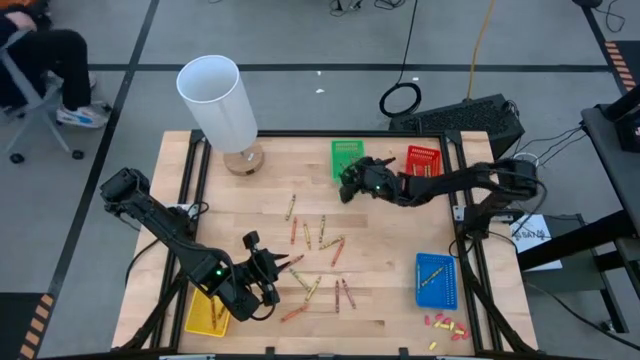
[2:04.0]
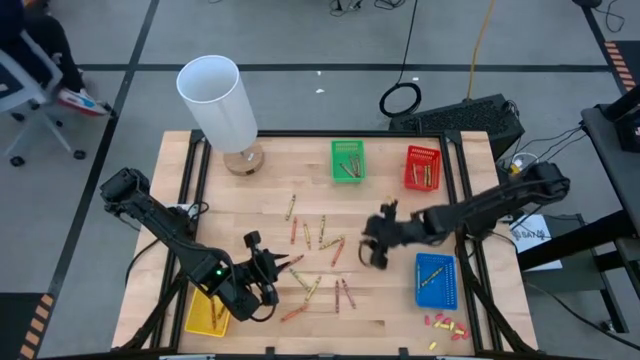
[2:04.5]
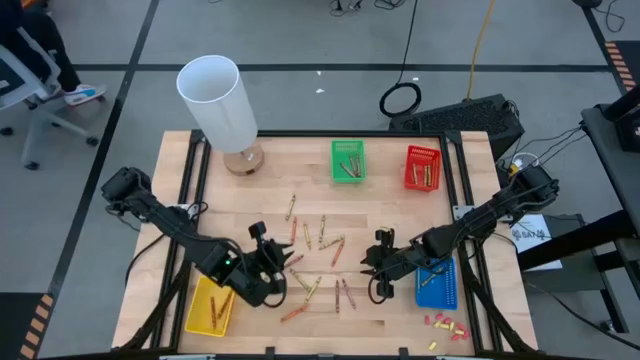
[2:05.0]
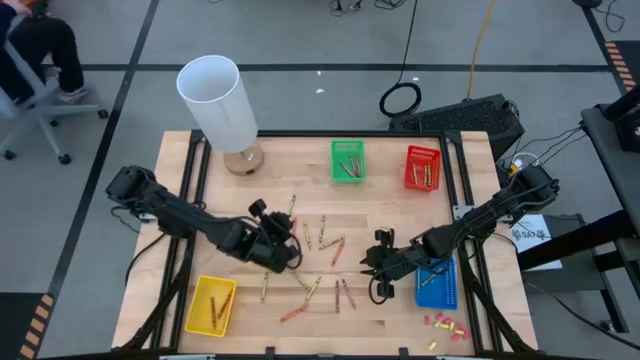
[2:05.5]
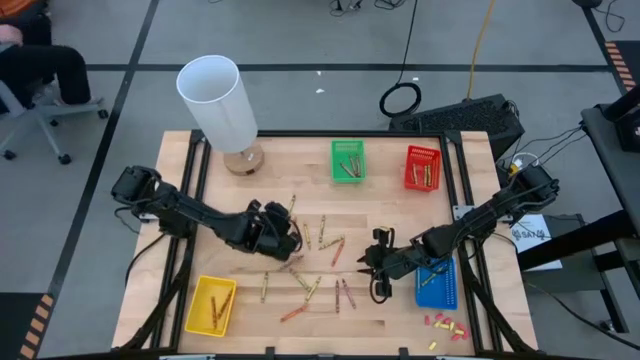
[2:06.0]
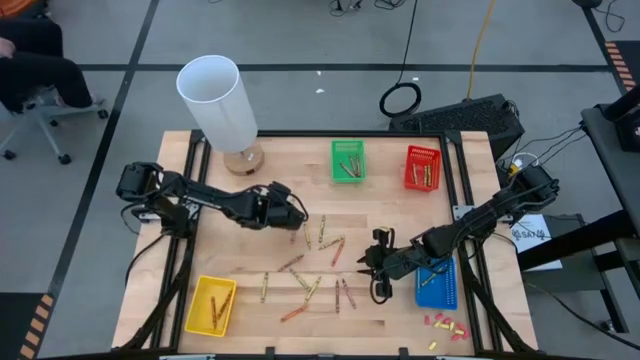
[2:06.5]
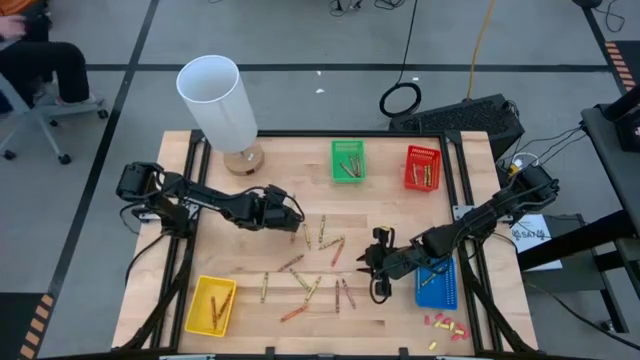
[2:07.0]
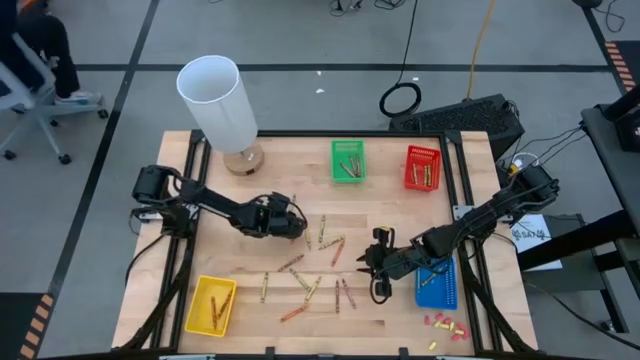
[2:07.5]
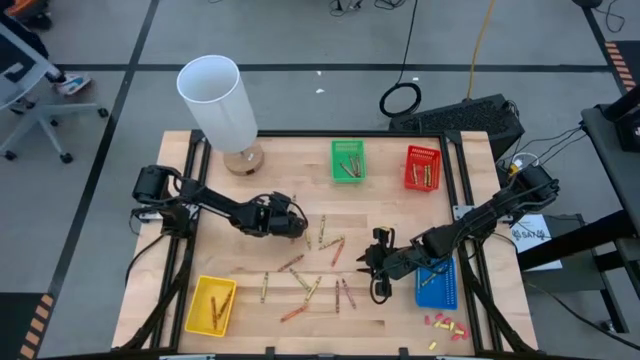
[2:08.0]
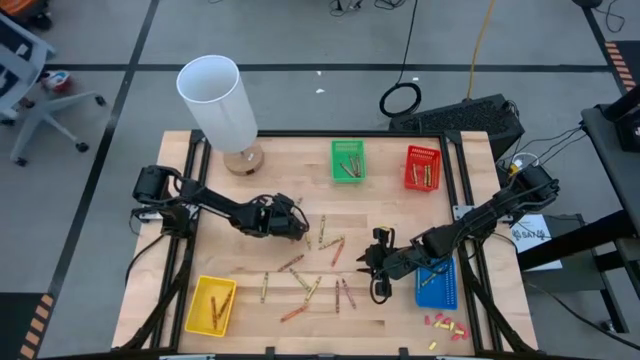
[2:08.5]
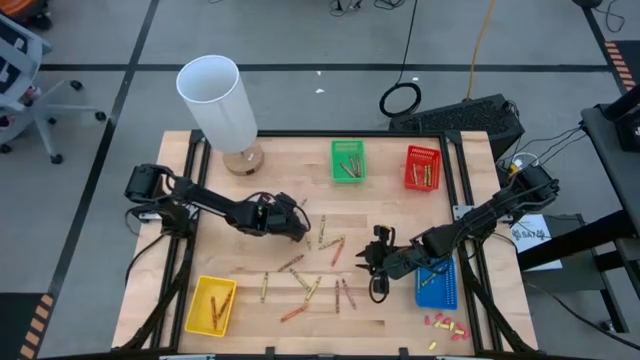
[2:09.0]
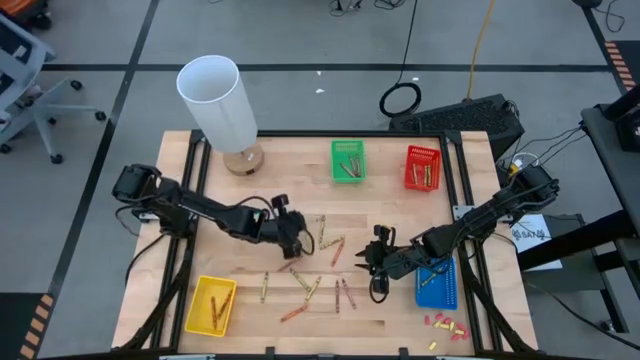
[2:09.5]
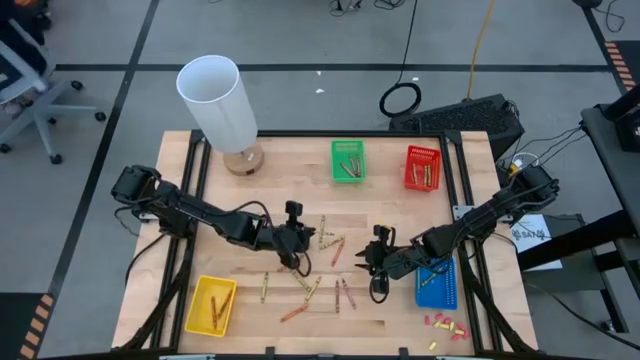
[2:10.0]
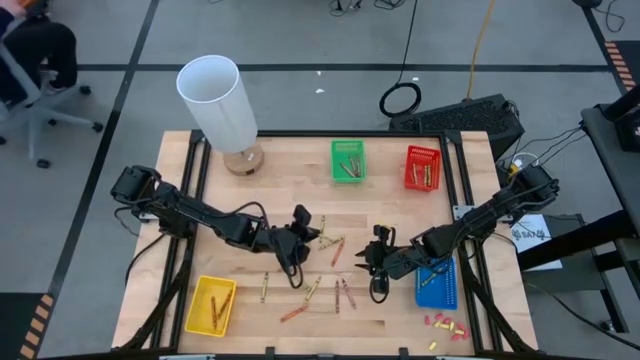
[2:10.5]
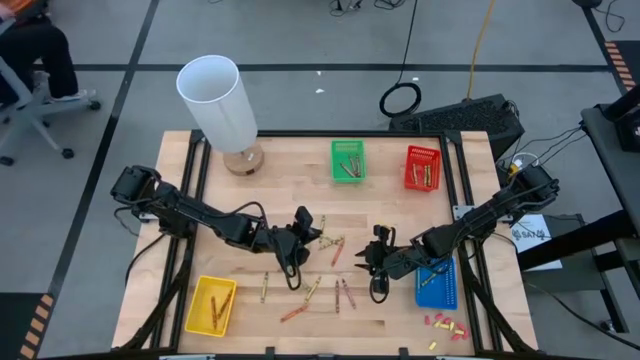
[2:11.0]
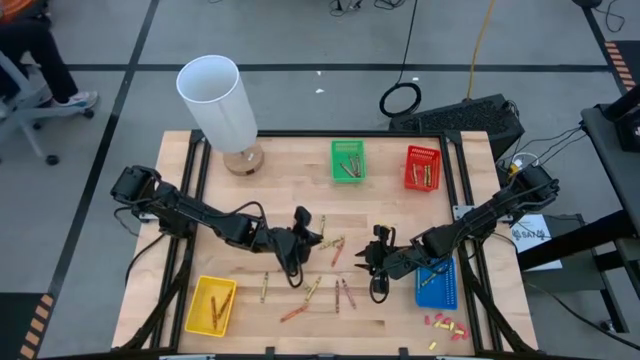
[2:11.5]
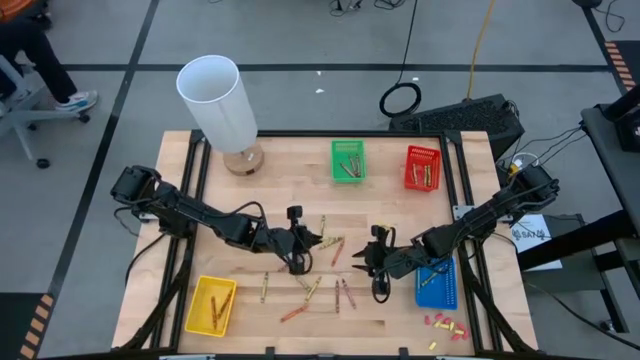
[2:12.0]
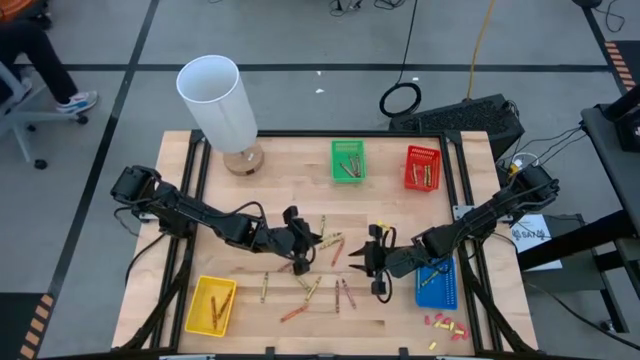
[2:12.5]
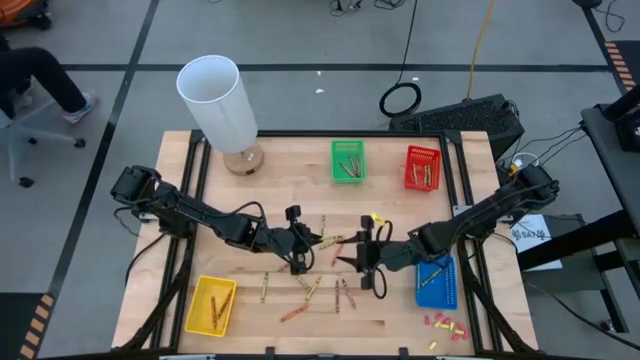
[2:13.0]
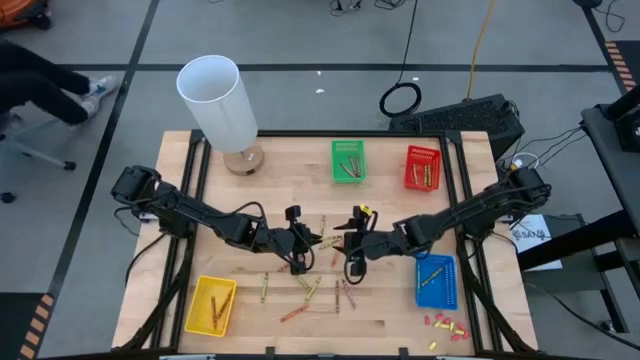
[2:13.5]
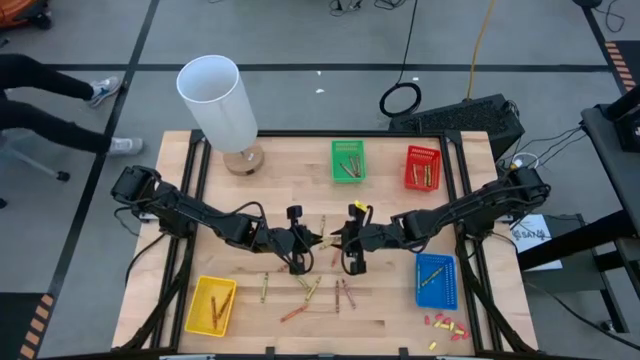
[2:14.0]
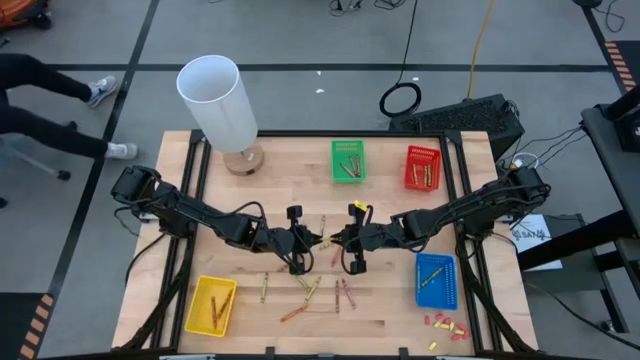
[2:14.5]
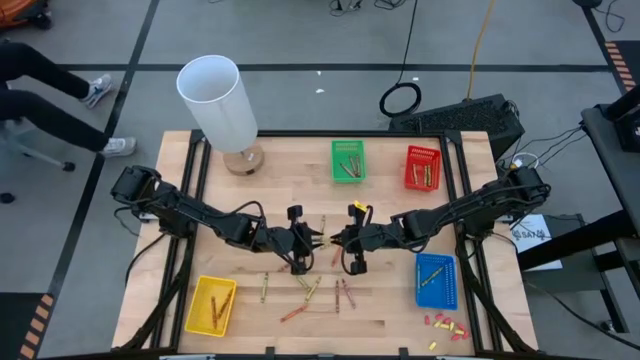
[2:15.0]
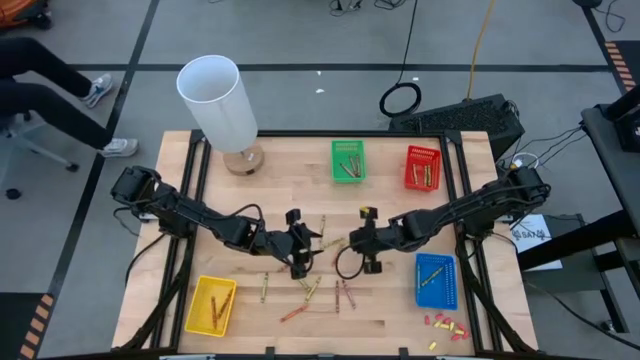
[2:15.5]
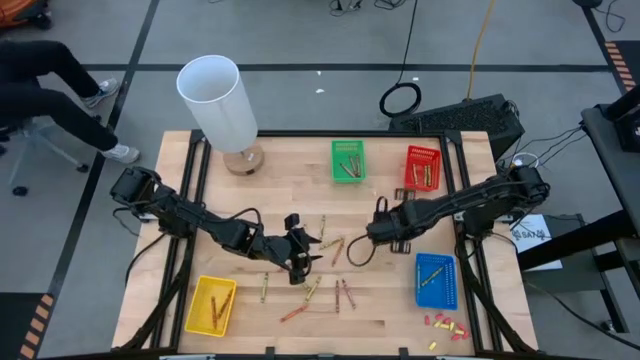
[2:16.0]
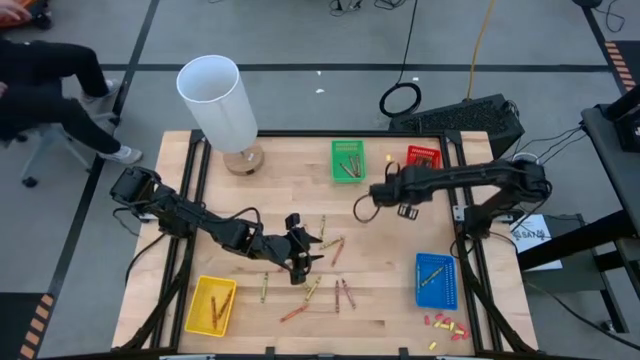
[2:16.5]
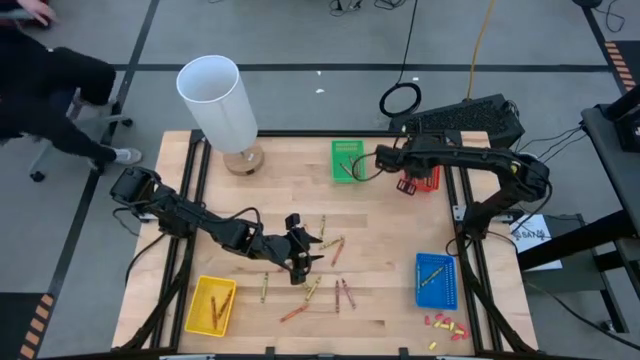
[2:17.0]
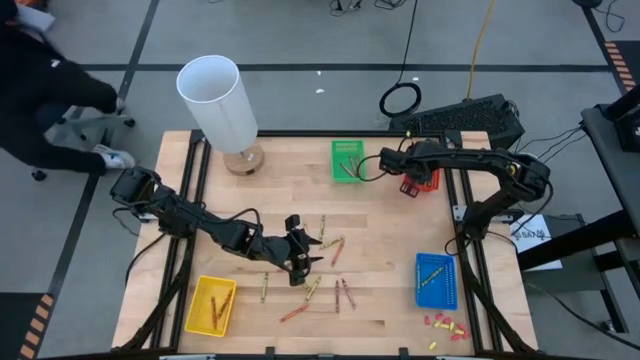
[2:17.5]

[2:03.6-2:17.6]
Task: Sort crayons
Put the green crayon into the red bin

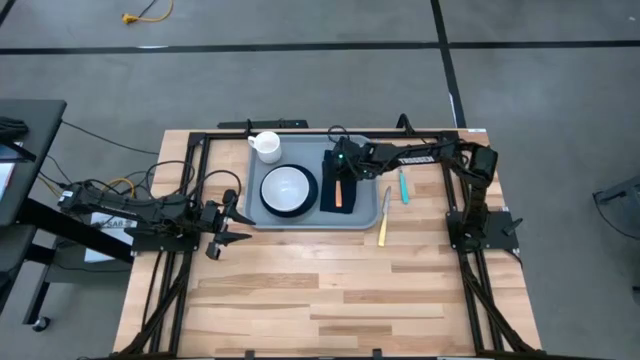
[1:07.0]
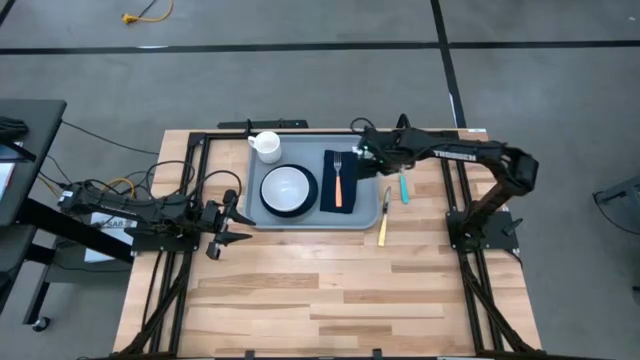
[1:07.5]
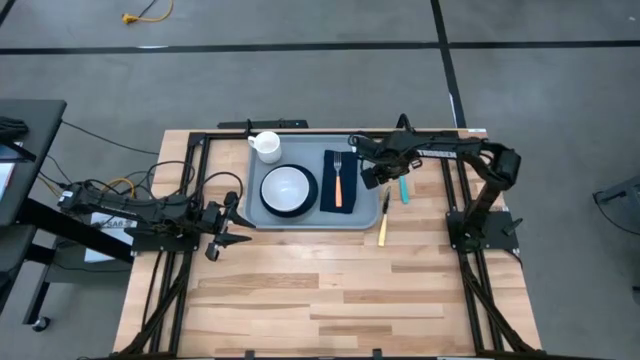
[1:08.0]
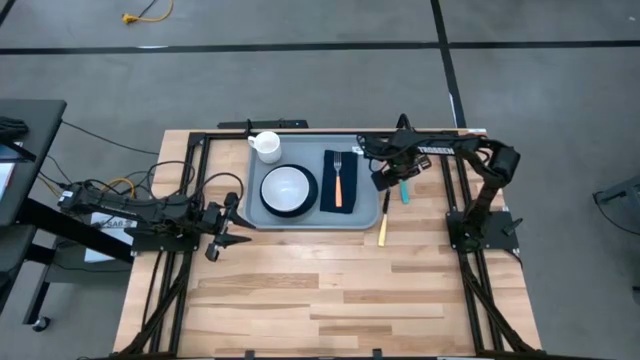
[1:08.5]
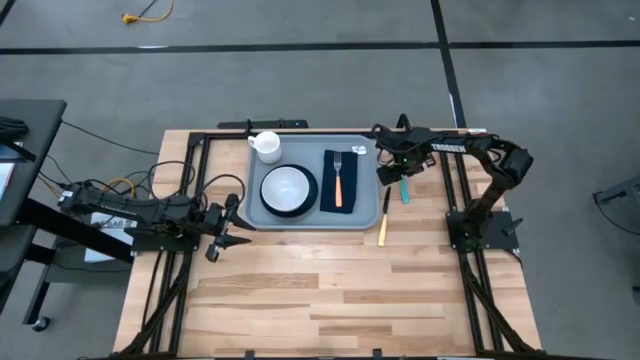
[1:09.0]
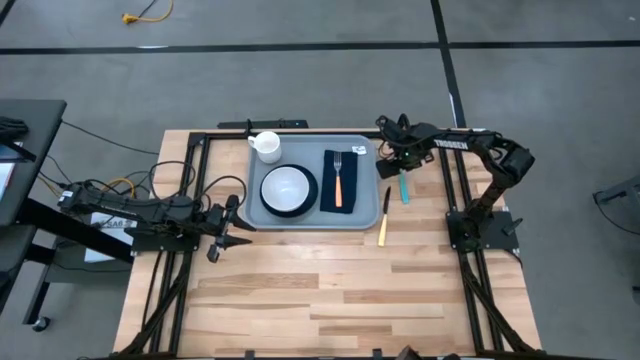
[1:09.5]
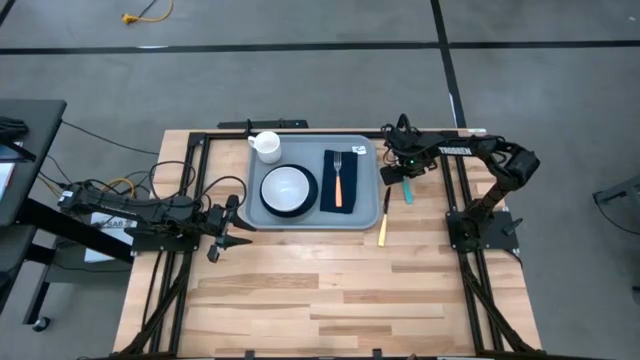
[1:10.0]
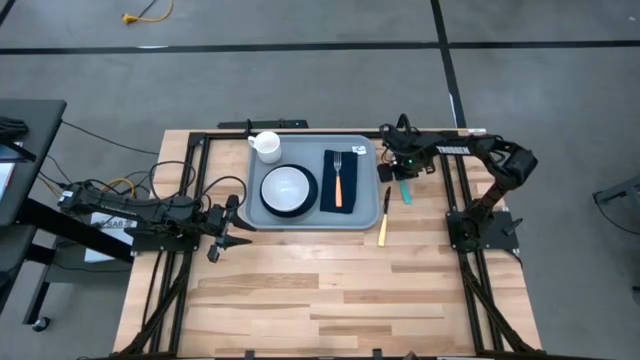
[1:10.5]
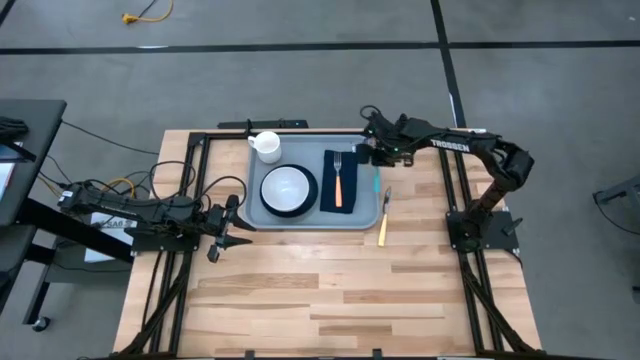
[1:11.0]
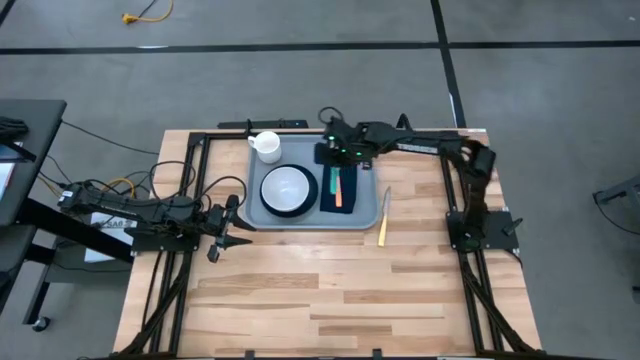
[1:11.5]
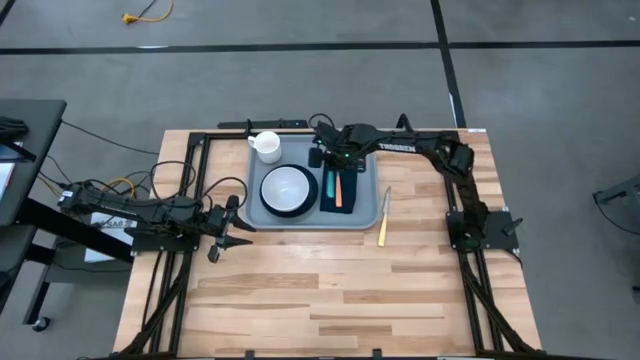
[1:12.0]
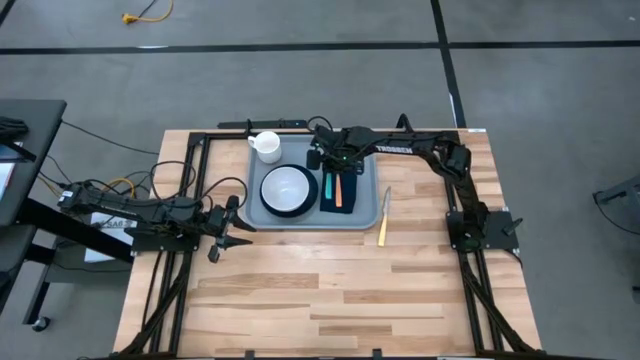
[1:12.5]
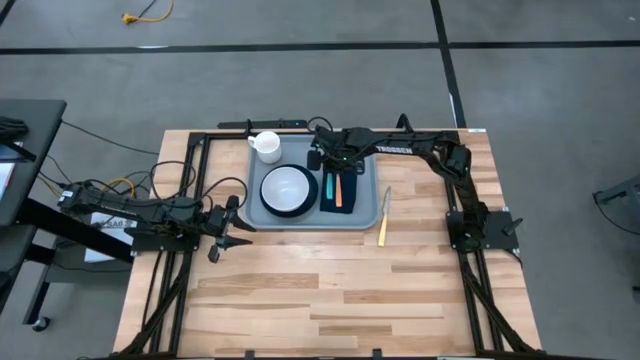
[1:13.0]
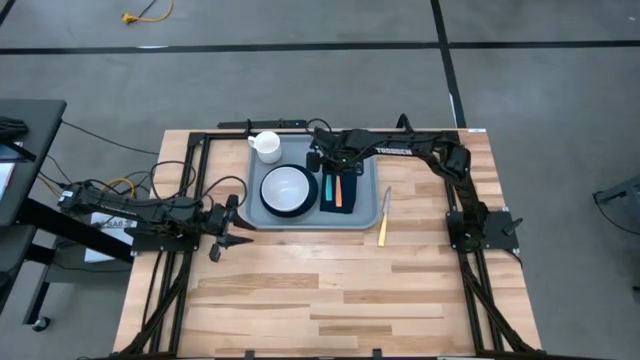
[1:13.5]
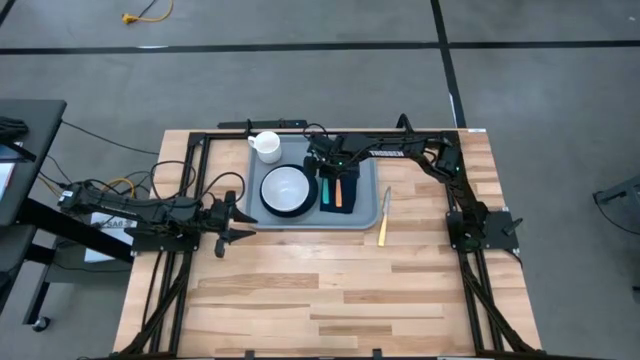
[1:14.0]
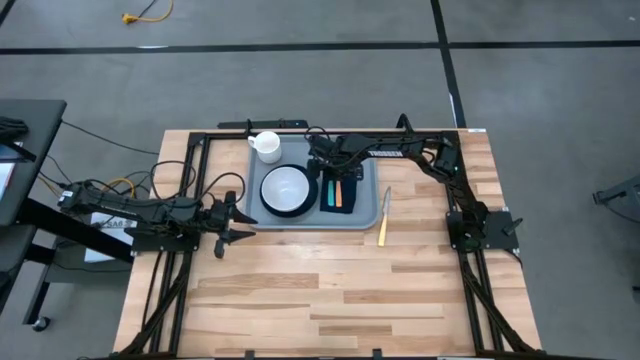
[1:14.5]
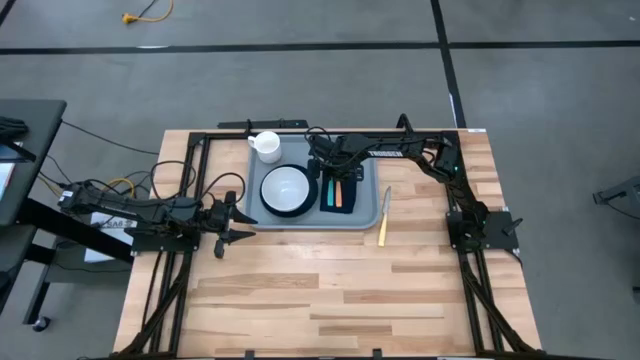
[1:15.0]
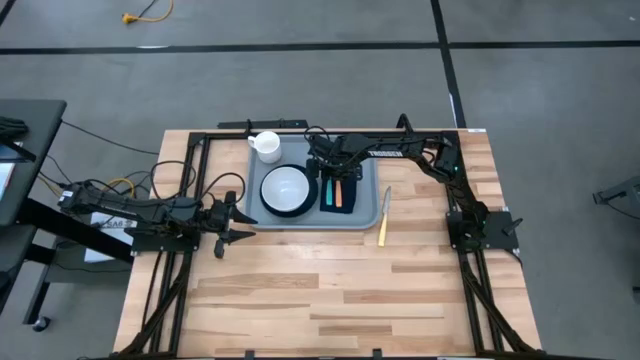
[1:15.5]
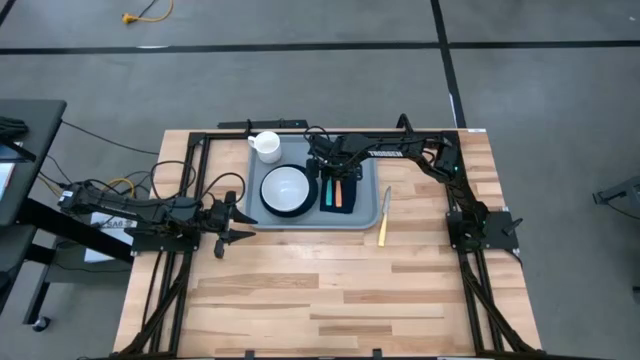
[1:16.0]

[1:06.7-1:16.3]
Task: Set up tray
Put the blue spoon on the left side of the orange fork
